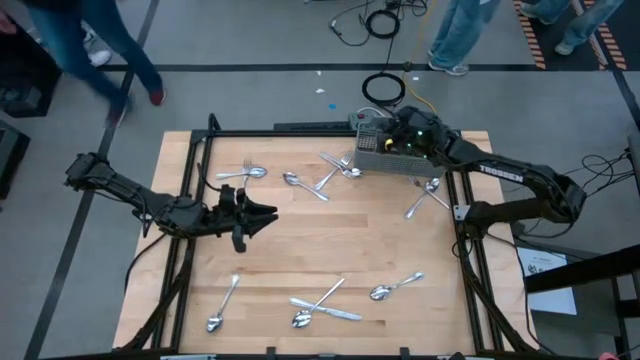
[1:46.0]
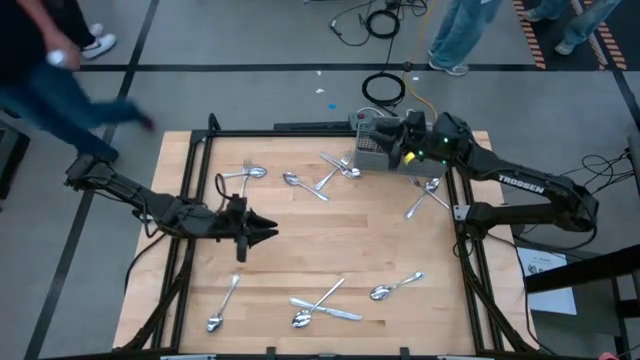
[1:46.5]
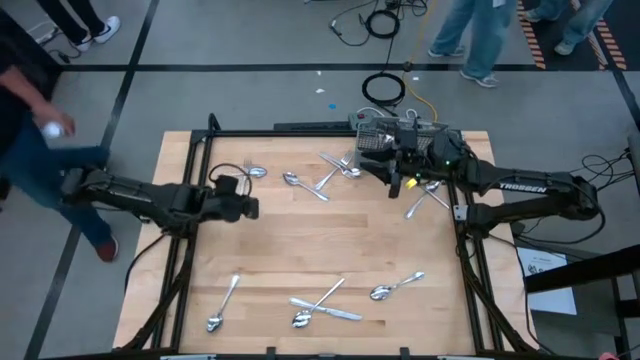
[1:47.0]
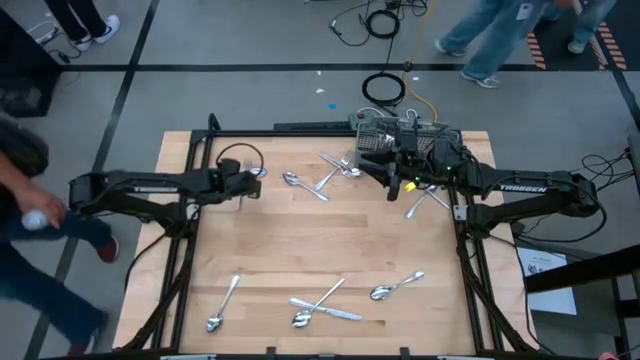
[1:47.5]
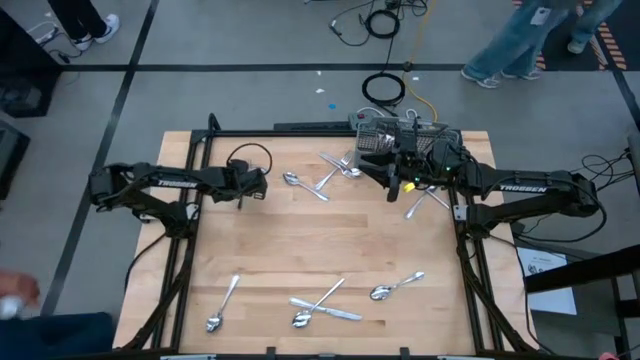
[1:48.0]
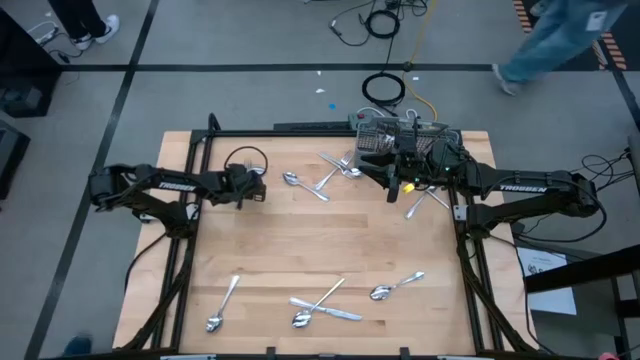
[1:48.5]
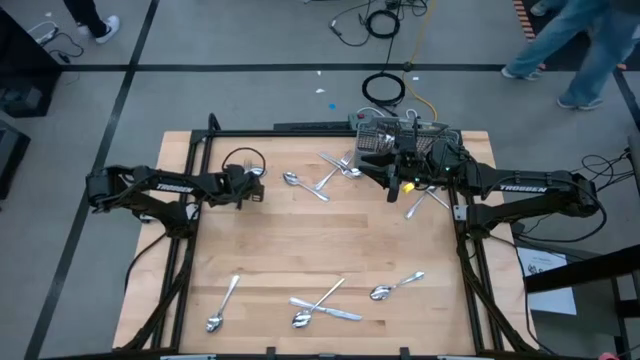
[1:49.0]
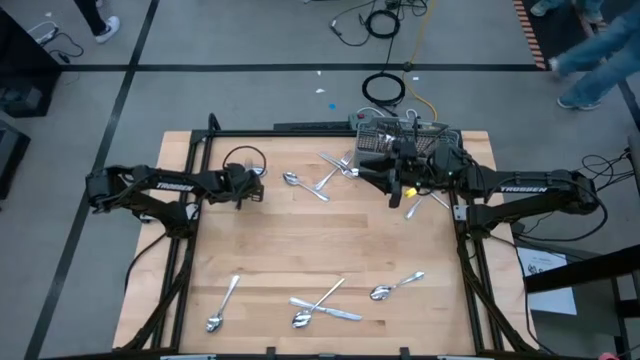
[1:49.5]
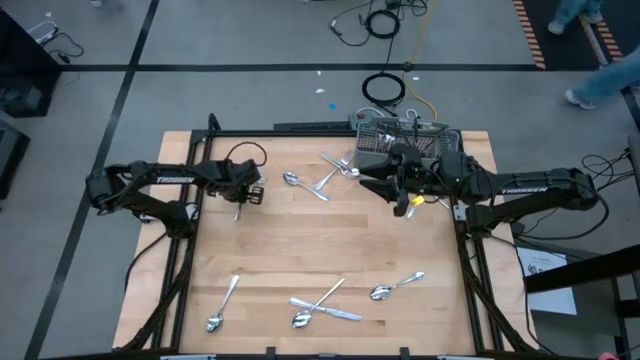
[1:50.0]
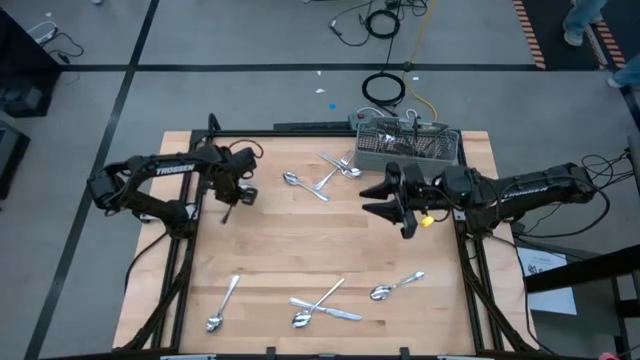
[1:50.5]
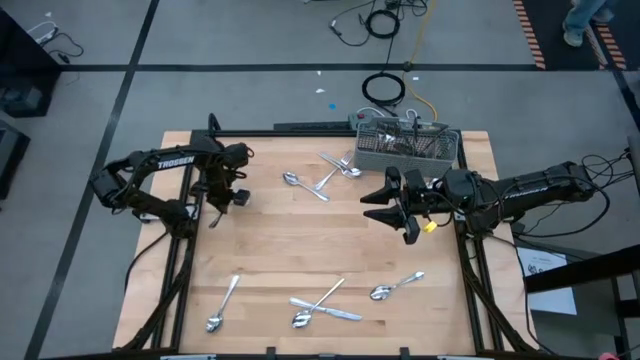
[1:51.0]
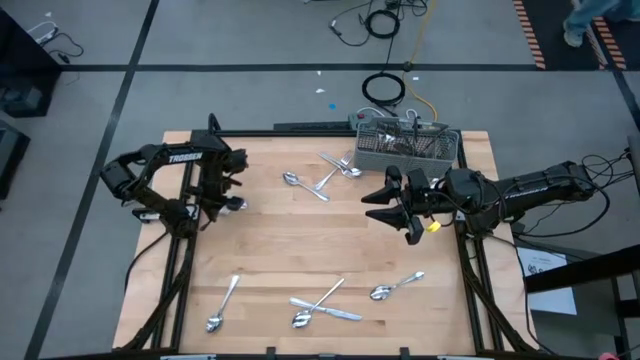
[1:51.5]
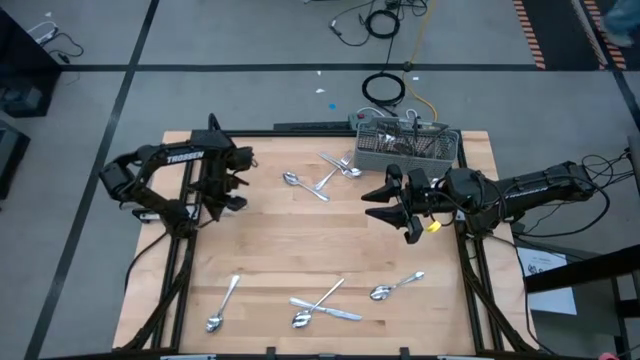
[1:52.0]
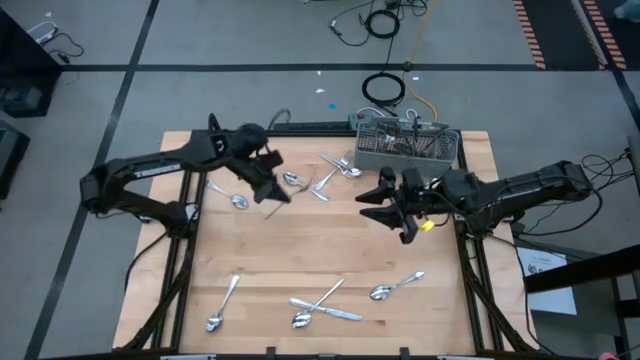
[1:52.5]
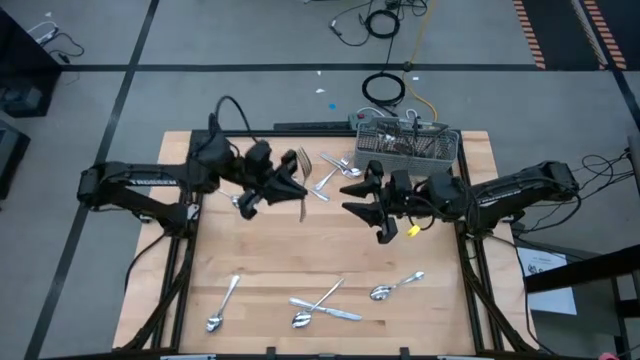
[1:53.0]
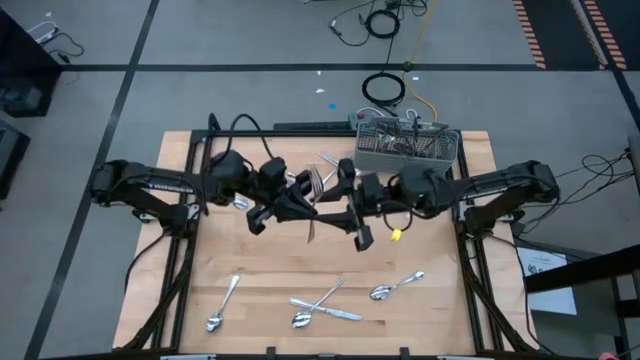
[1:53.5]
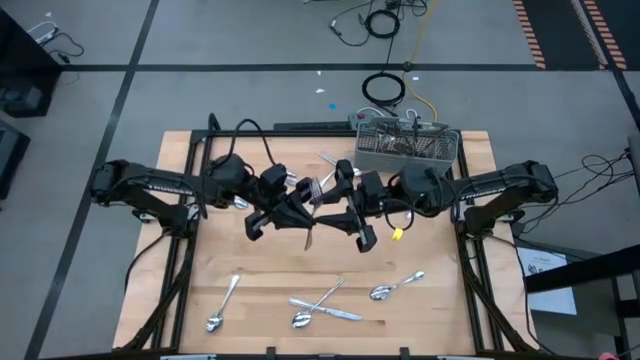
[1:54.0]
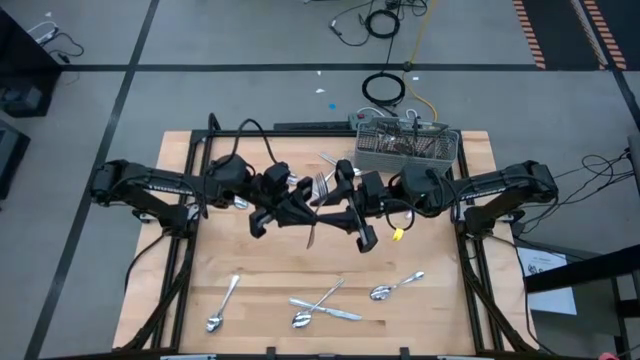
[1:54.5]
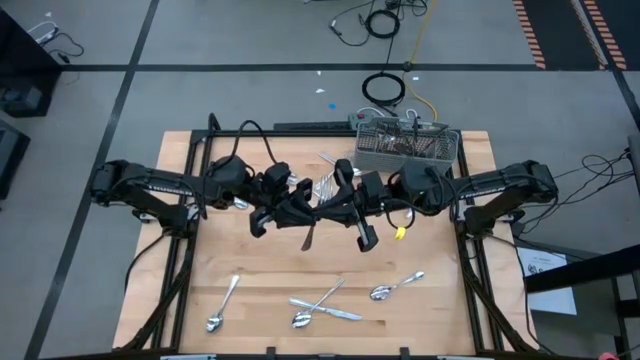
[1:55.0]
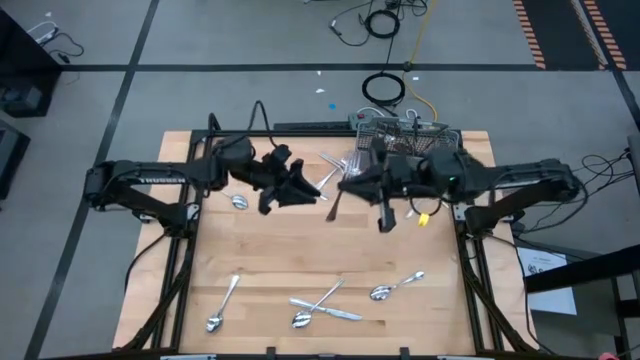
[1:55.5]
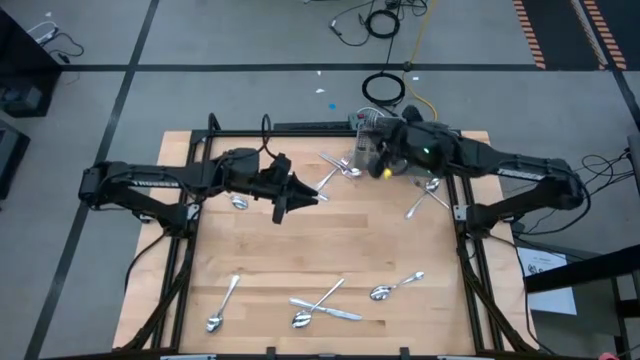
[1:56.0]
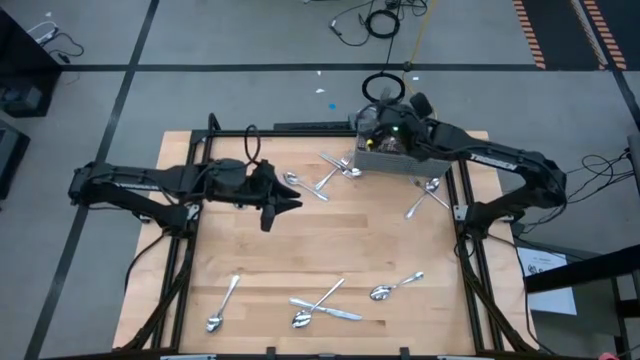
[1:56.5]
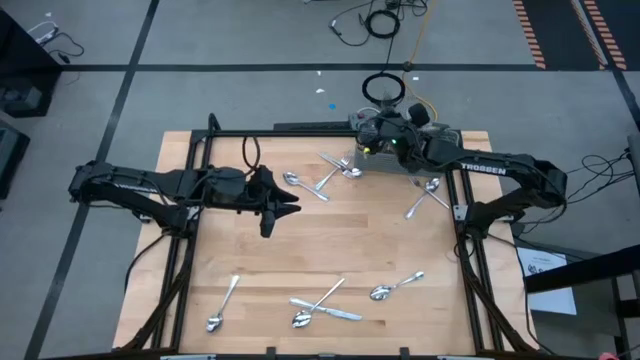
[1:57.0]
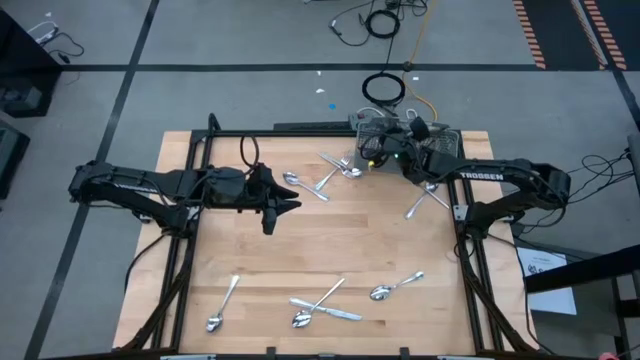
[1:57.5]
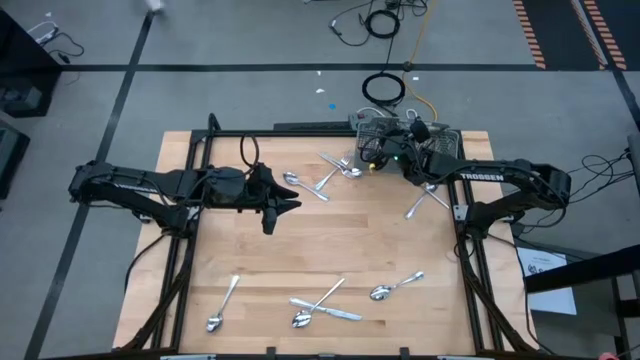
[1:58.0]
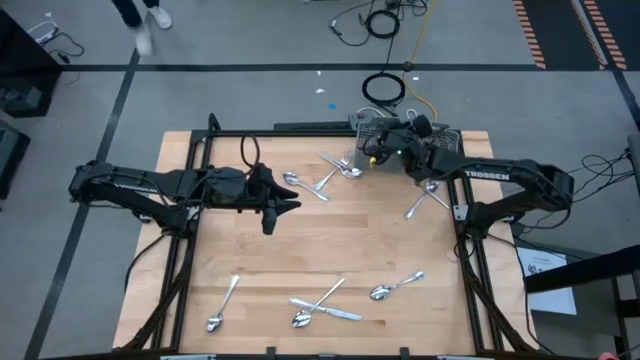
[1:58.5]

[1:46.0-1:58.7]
Task: Sort silverware
Put the silver fork into the gray utensil holder

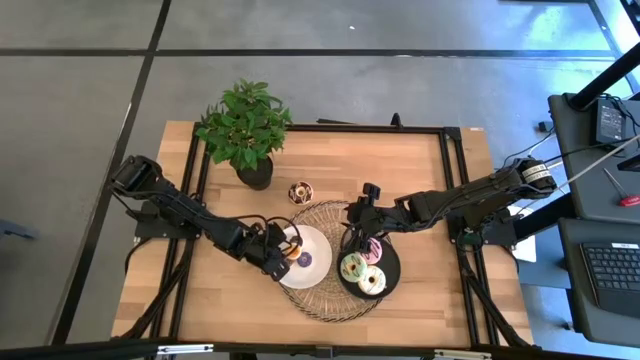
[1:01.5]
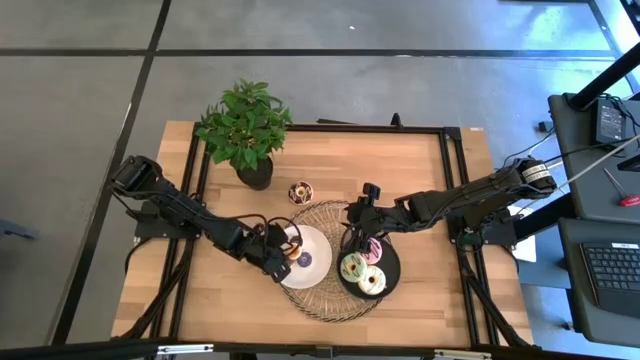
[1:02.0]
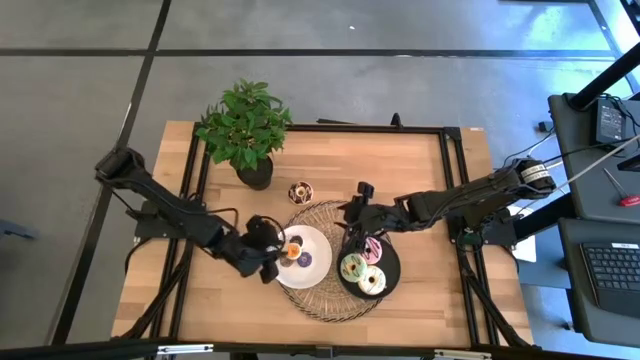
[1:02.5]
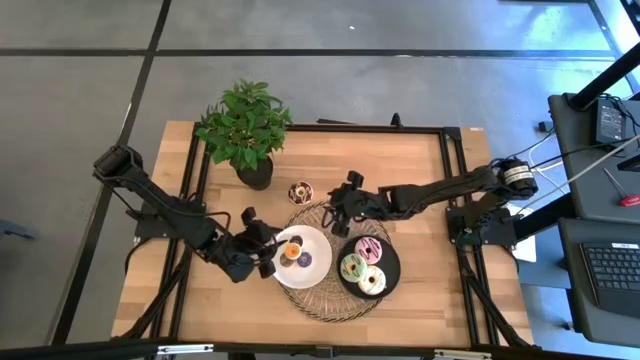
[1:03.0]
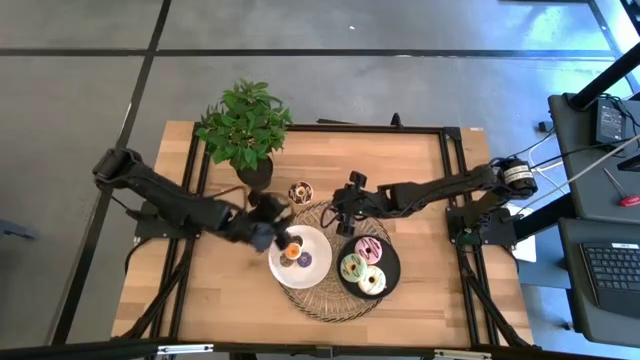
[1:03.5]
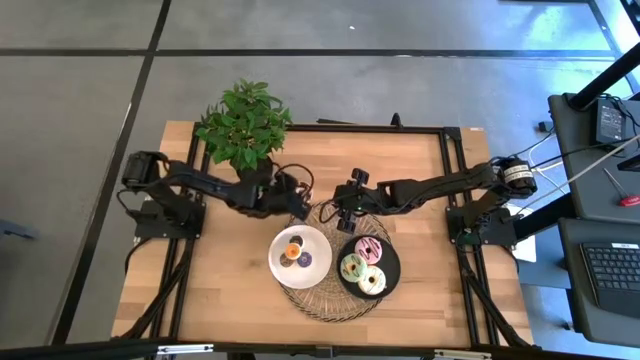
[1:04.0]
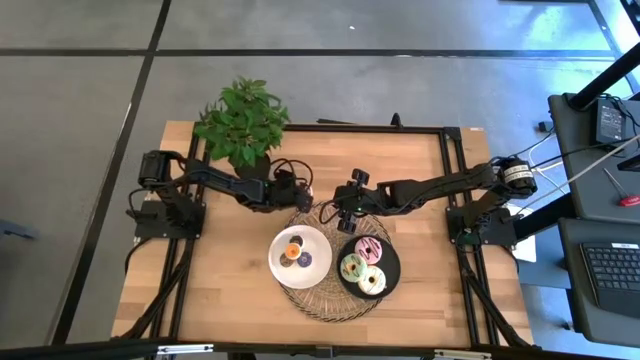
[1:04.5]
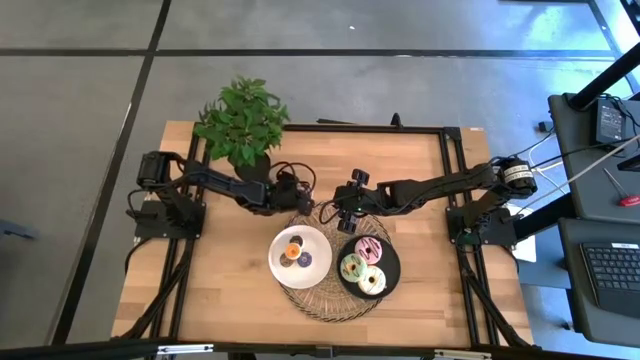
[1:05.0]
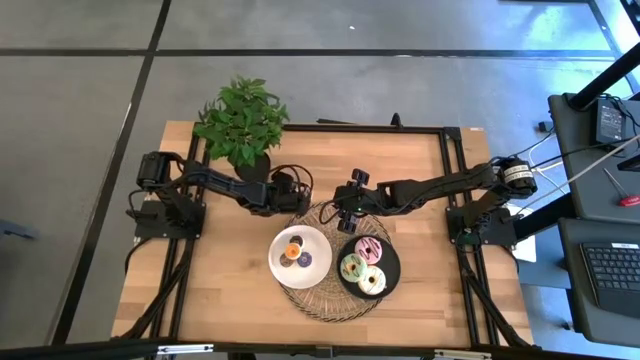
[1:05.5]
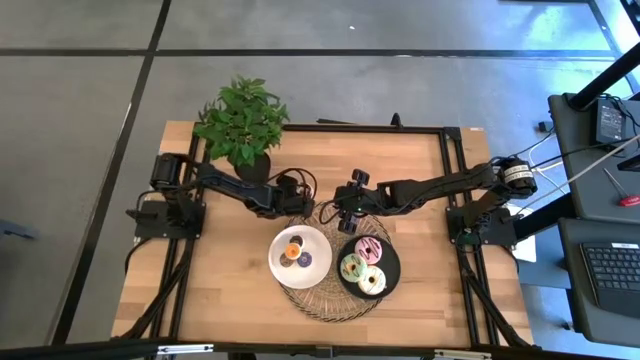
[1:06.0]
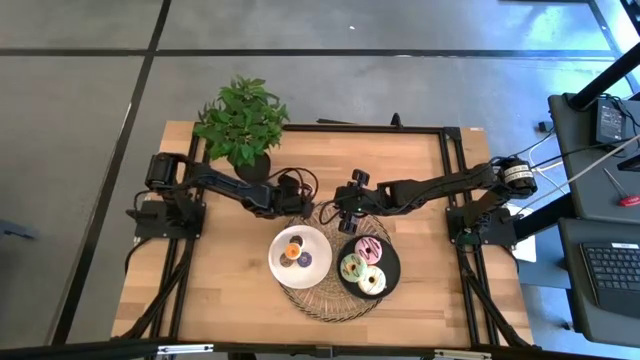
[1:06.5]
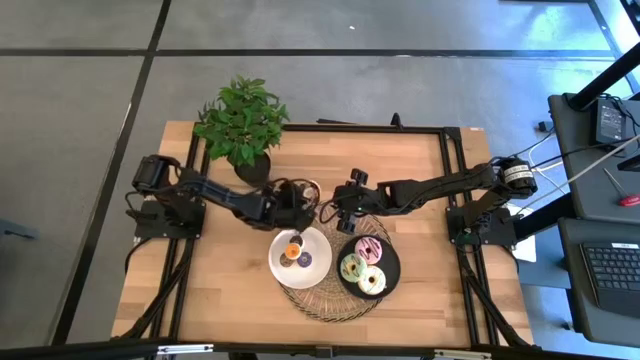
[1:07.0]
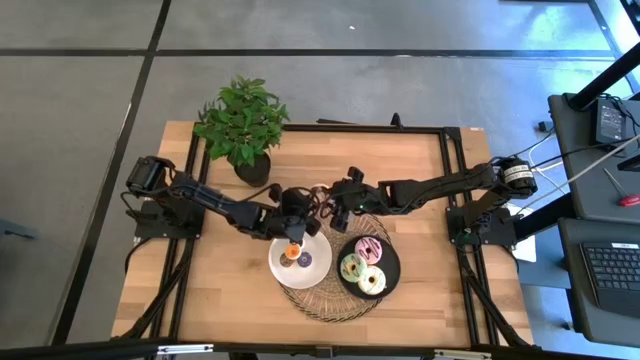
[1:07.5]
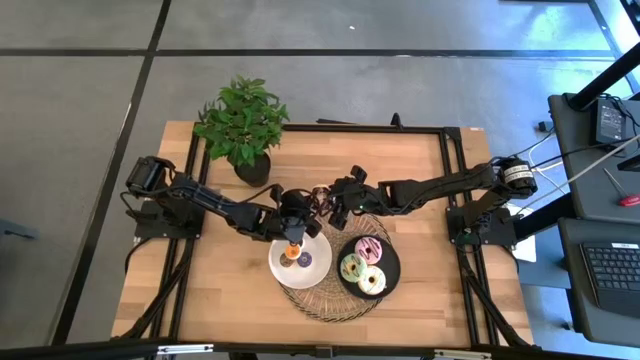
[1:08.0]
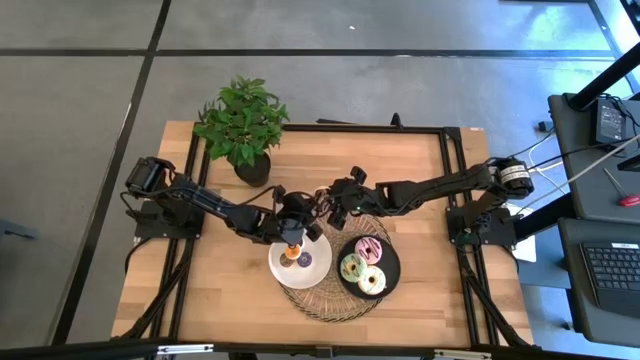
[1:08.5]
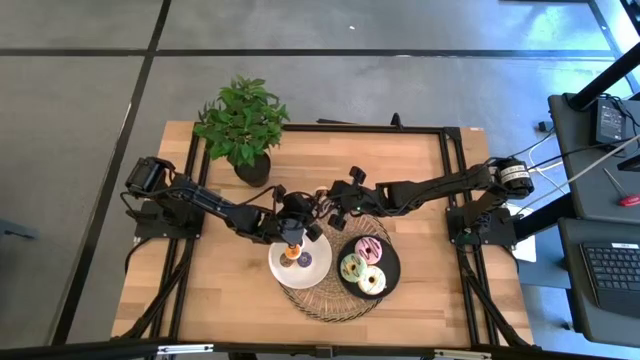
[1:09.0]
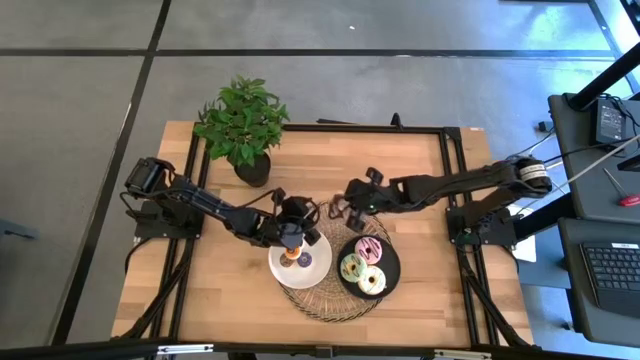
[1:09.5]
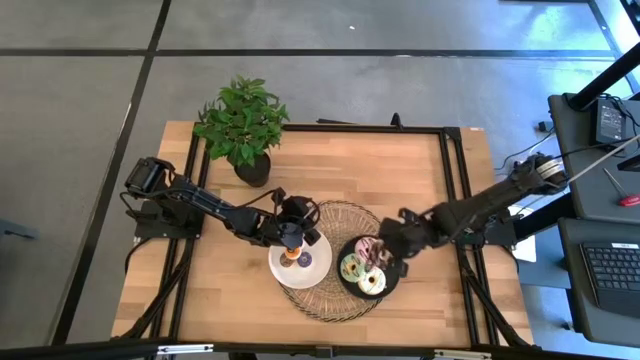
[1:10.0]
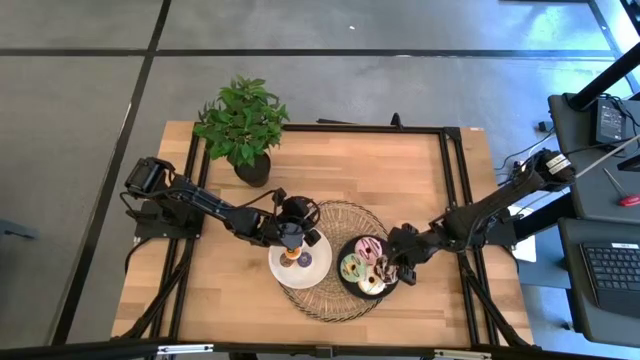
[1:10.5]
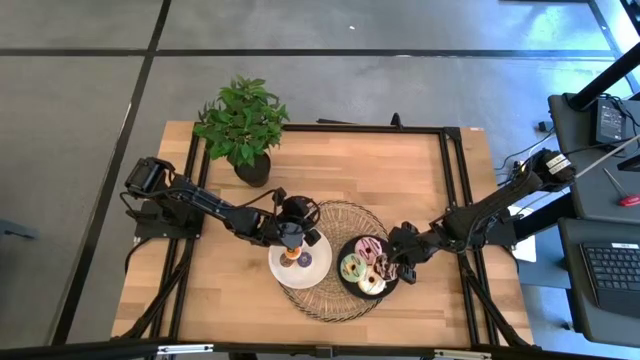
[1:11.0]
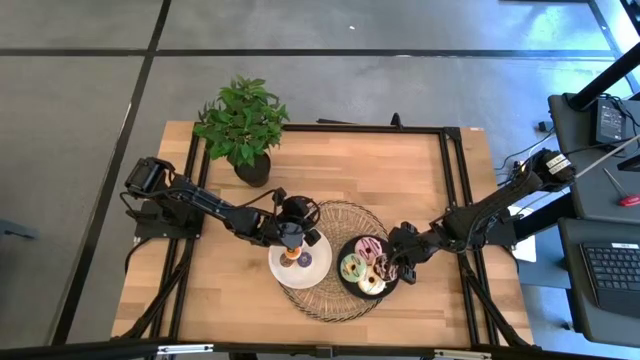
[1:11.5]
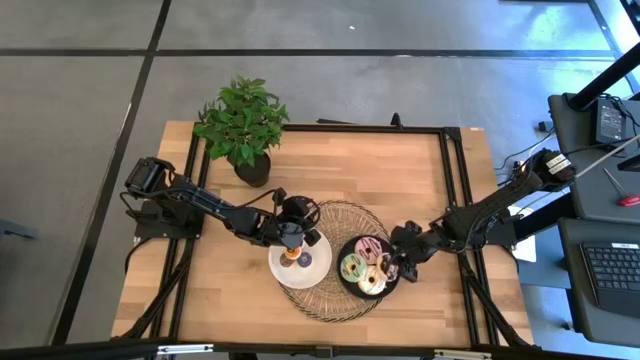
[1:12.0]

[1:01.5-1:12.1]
Task: Pick & Place donuts
Put the large black donut on the black plate
